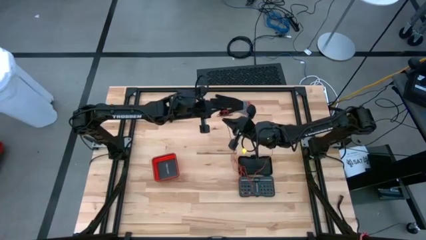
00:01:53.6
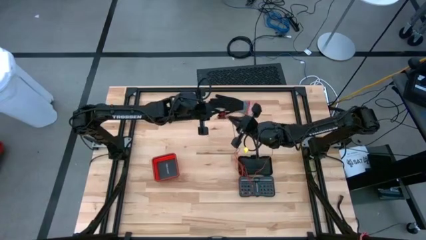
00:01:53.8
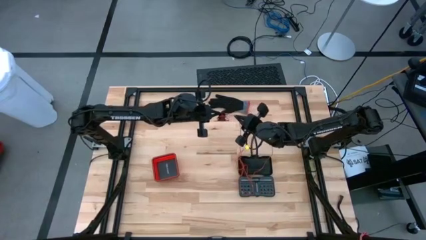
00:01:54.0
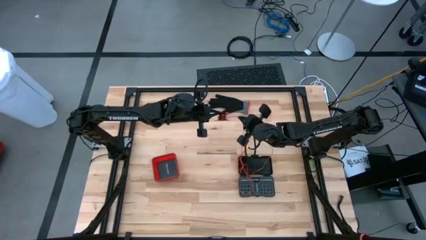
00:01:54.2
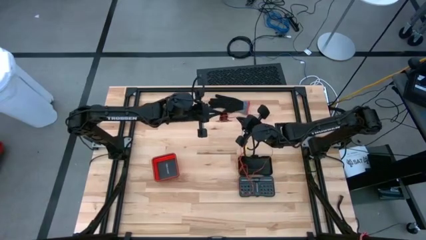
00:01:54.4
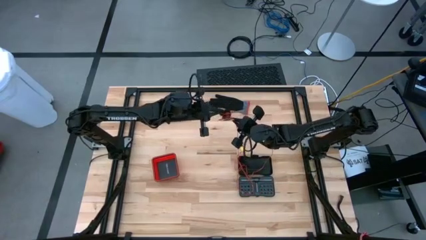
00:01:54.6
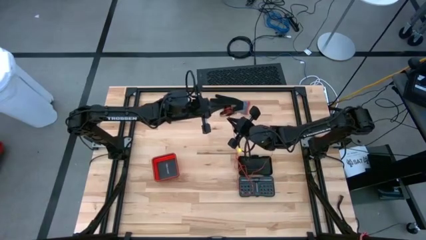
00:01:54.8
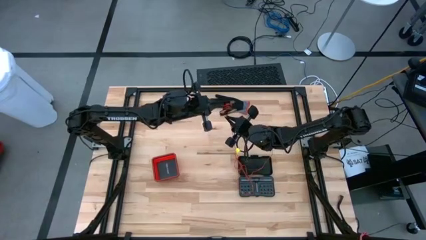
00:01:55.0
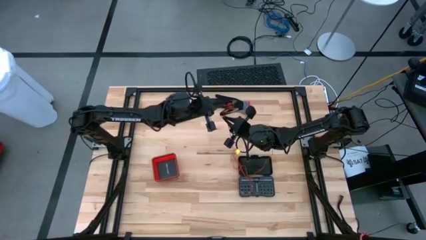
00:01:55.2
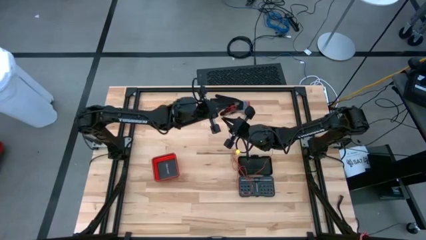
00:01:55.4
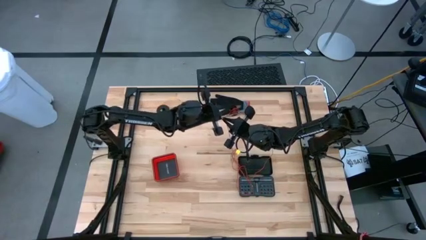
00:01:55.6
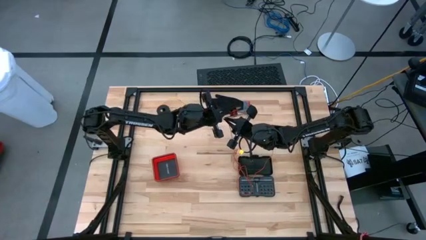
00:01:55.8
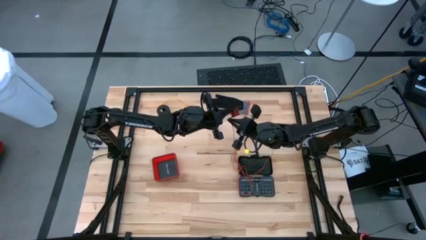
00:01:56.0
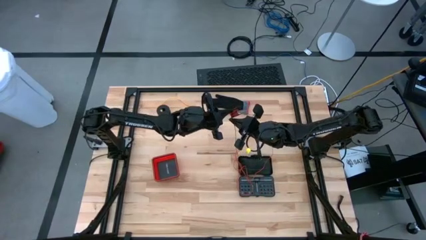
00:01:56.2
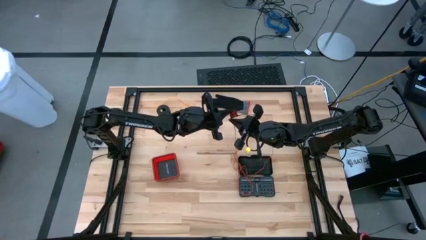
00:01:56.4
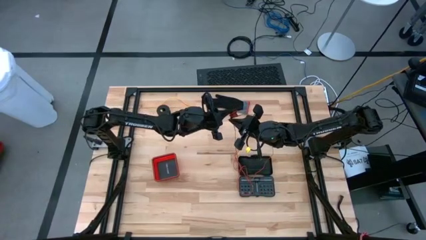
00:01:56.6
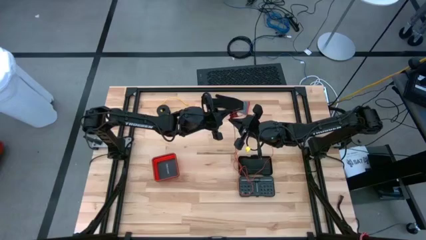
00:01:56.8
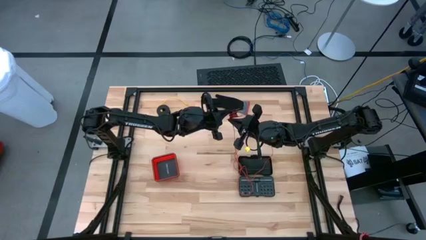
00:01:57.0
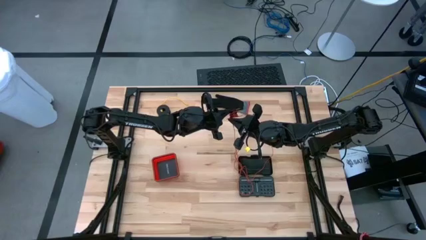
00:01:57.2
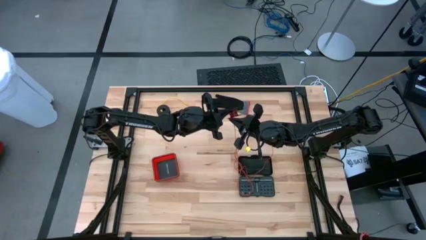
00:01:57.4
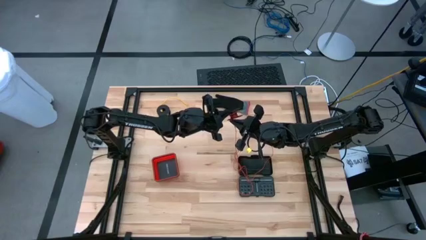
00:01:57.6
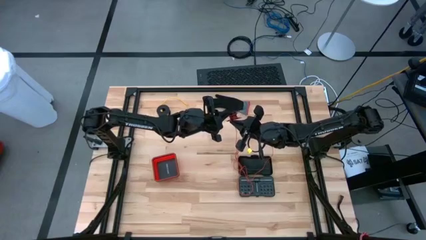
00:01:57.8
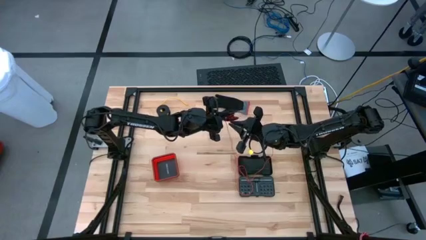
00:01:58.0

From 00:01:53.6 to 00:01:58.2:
Task: Coil cords
Coil the red wire onto the spool

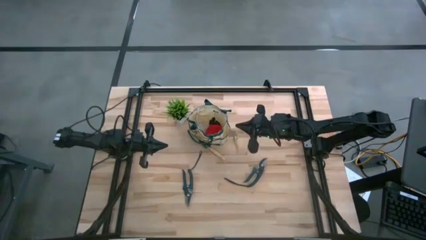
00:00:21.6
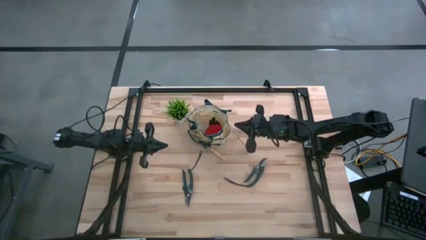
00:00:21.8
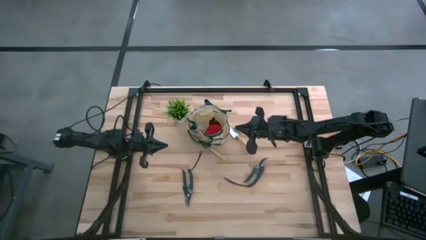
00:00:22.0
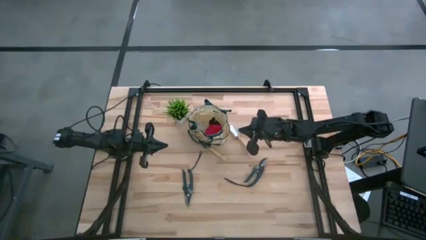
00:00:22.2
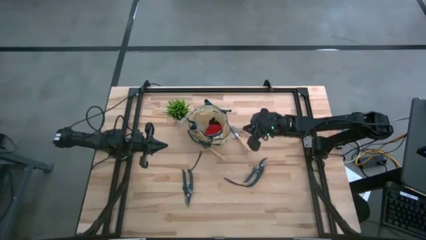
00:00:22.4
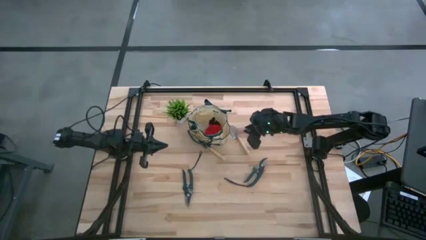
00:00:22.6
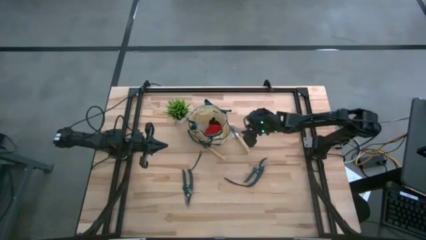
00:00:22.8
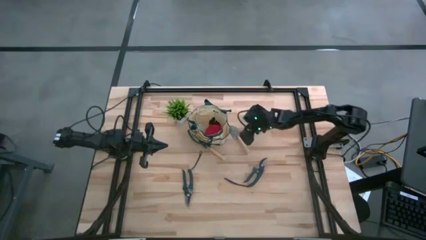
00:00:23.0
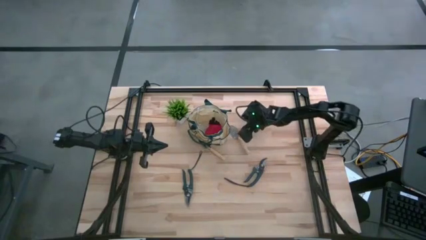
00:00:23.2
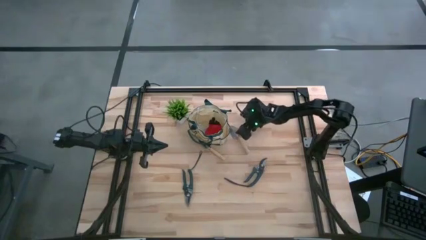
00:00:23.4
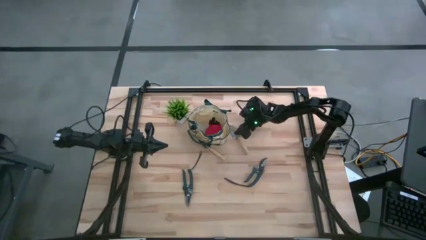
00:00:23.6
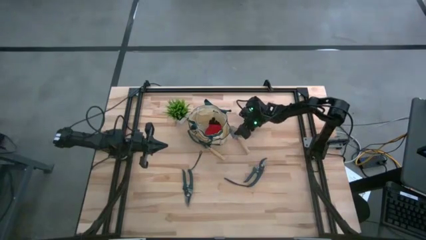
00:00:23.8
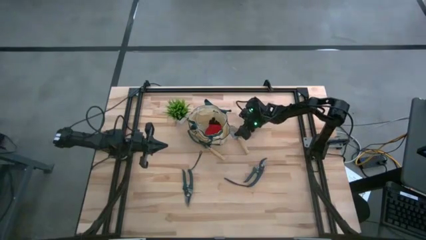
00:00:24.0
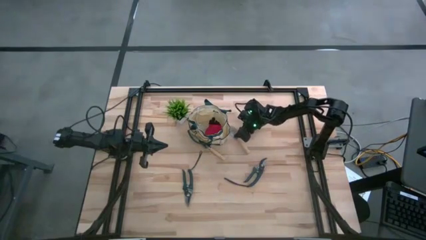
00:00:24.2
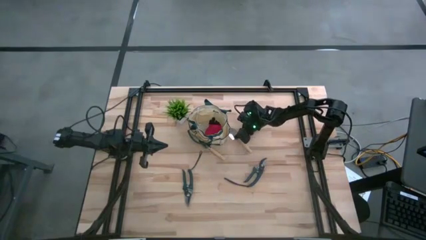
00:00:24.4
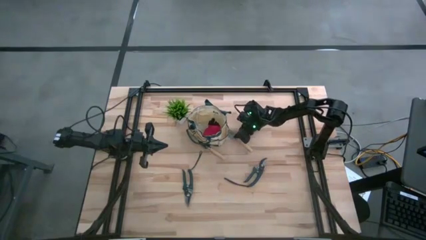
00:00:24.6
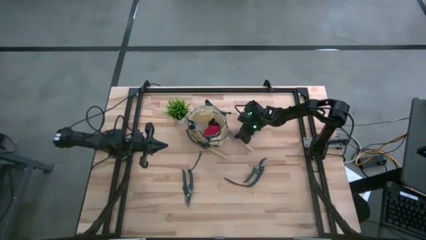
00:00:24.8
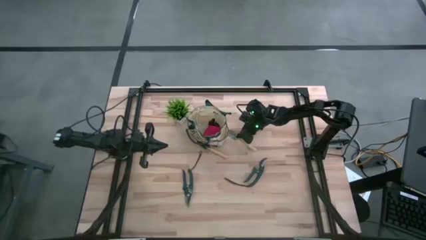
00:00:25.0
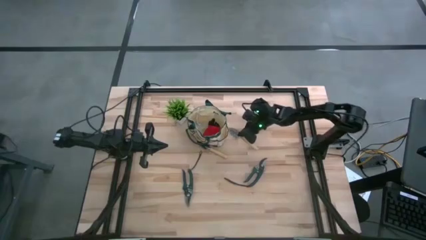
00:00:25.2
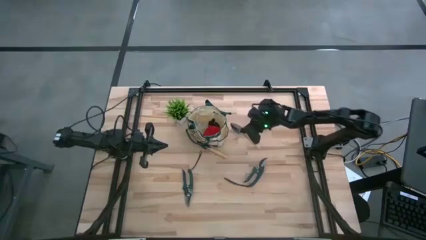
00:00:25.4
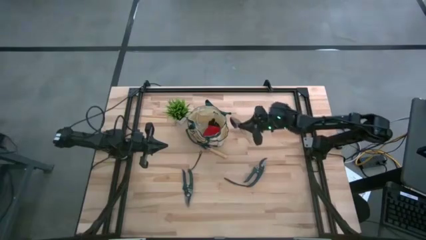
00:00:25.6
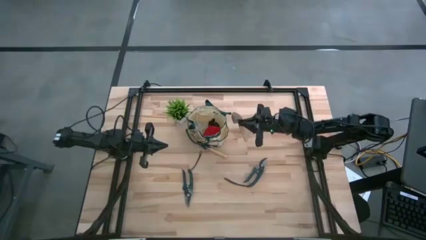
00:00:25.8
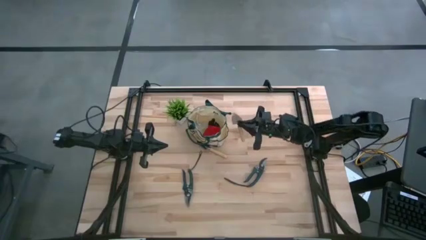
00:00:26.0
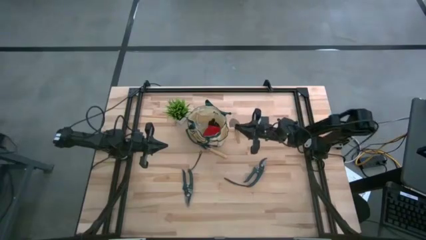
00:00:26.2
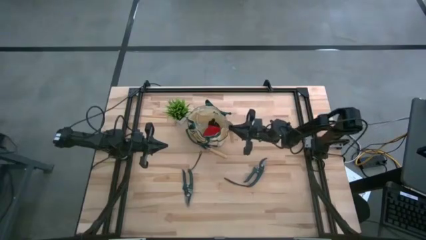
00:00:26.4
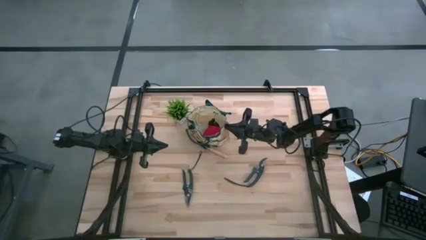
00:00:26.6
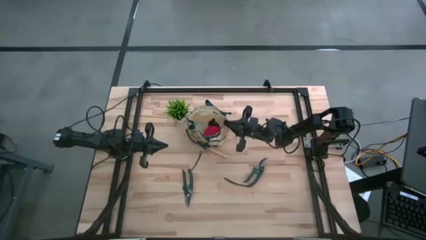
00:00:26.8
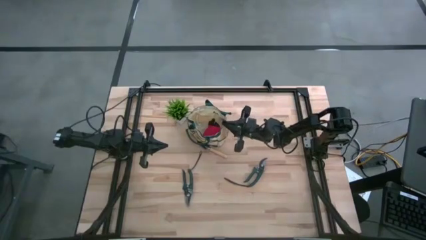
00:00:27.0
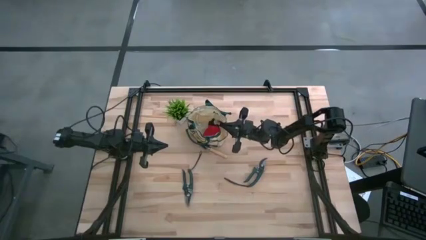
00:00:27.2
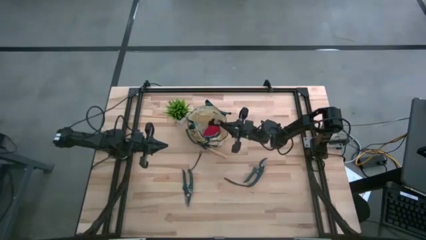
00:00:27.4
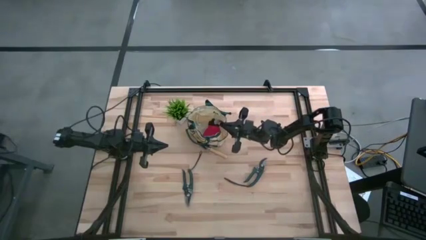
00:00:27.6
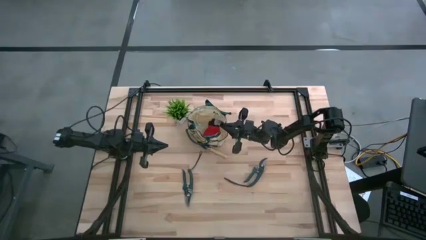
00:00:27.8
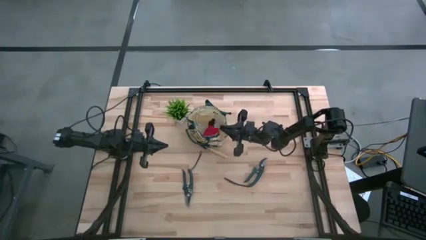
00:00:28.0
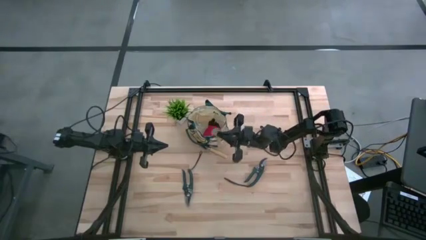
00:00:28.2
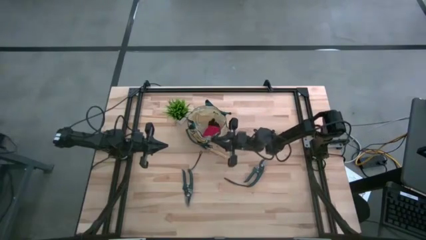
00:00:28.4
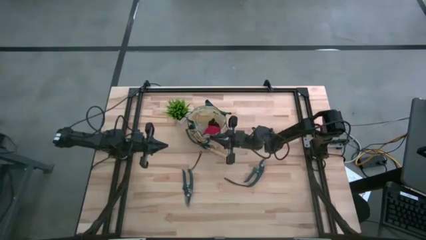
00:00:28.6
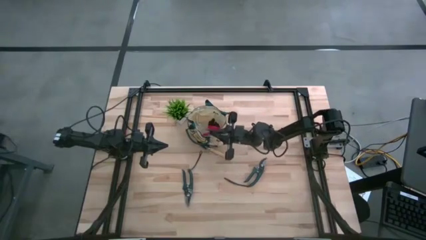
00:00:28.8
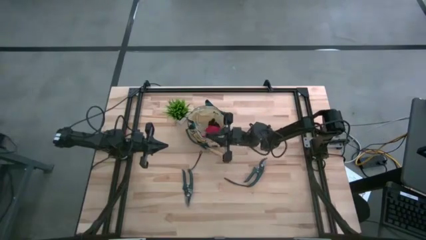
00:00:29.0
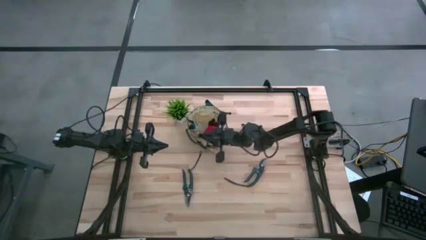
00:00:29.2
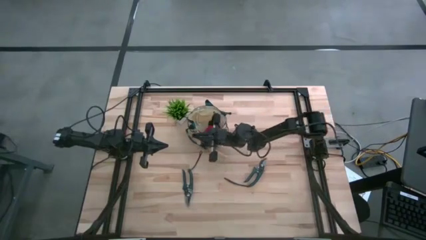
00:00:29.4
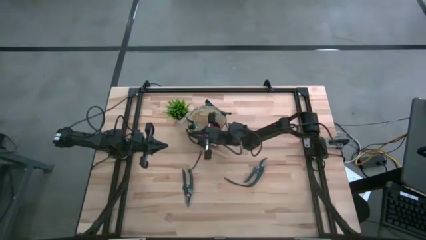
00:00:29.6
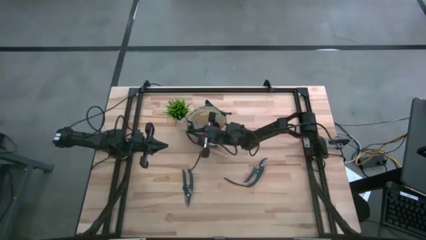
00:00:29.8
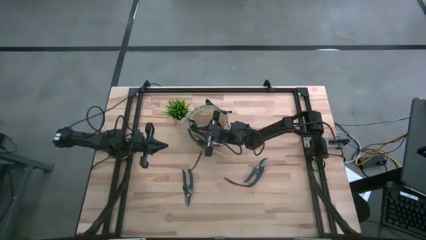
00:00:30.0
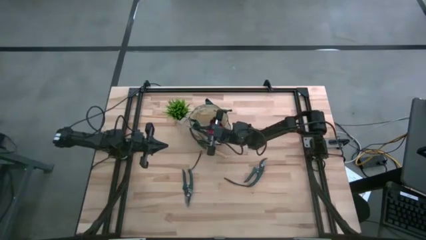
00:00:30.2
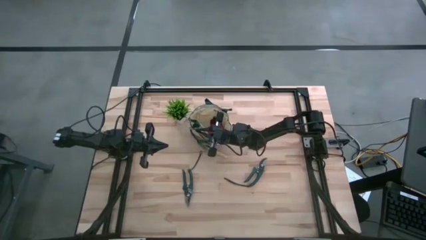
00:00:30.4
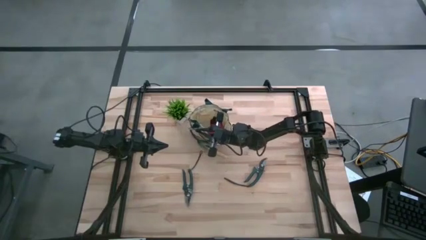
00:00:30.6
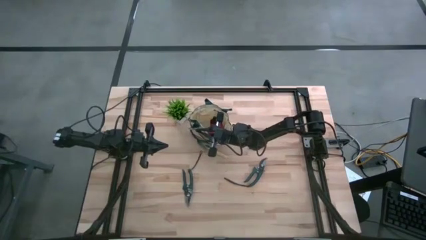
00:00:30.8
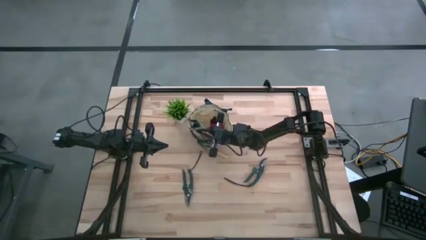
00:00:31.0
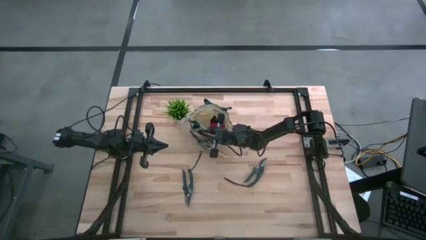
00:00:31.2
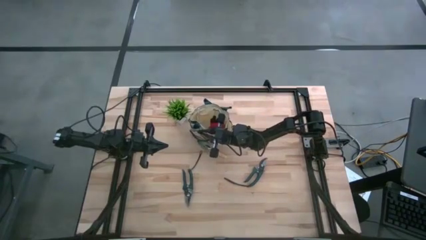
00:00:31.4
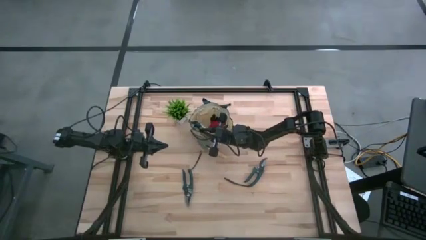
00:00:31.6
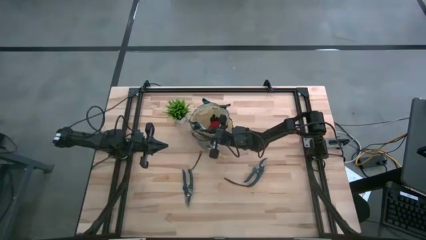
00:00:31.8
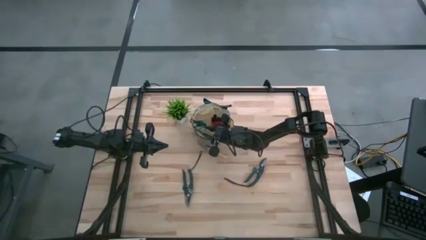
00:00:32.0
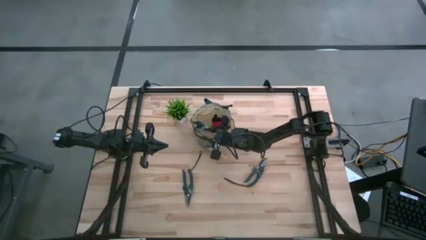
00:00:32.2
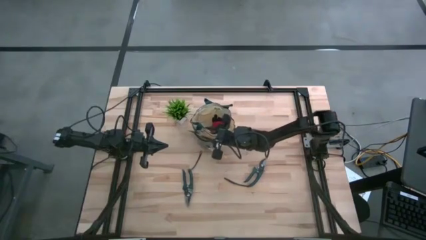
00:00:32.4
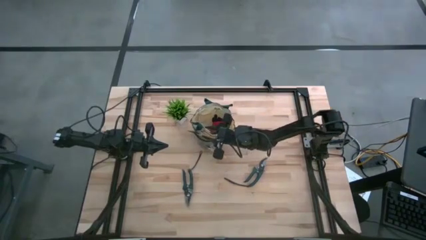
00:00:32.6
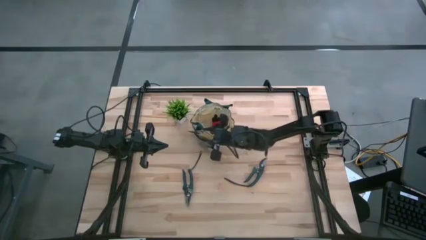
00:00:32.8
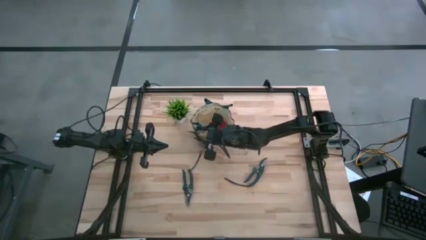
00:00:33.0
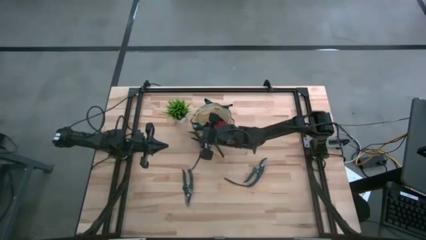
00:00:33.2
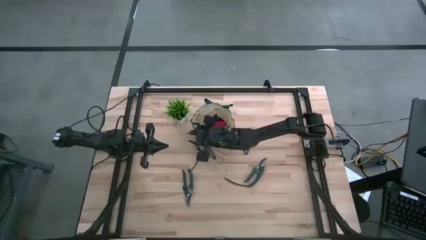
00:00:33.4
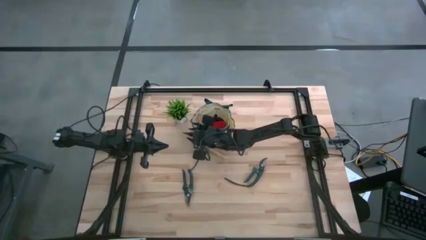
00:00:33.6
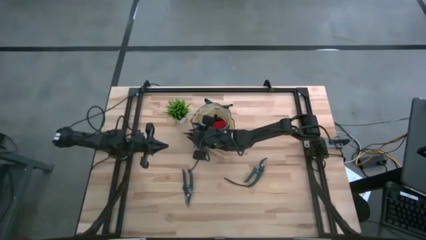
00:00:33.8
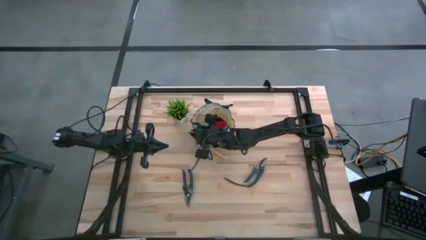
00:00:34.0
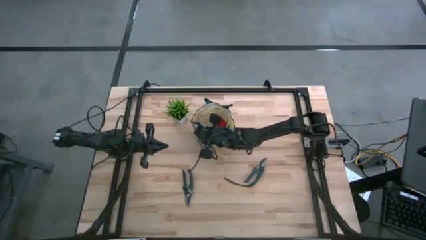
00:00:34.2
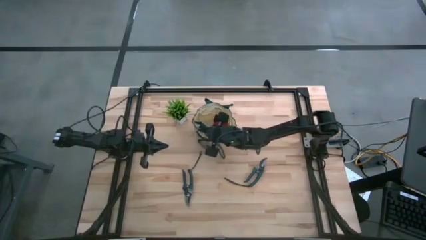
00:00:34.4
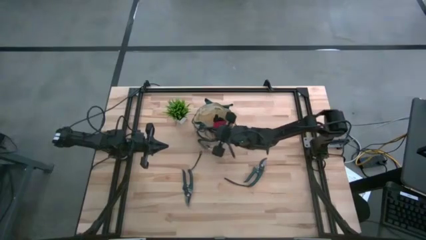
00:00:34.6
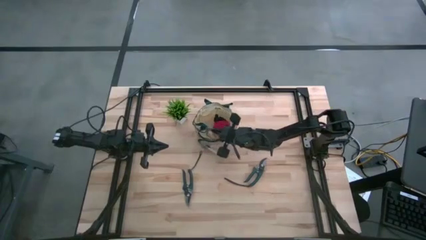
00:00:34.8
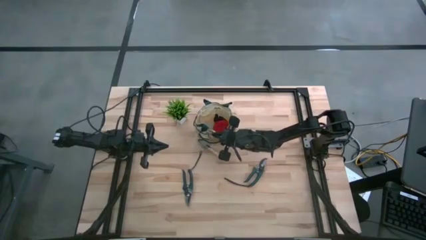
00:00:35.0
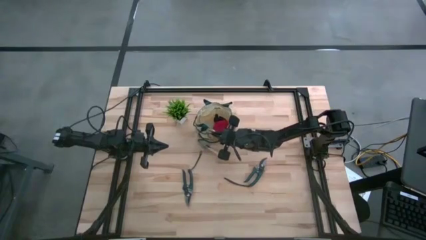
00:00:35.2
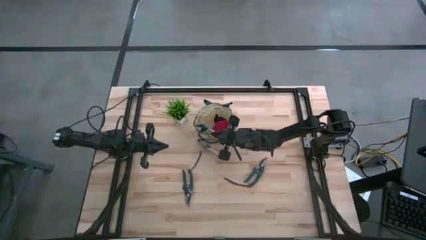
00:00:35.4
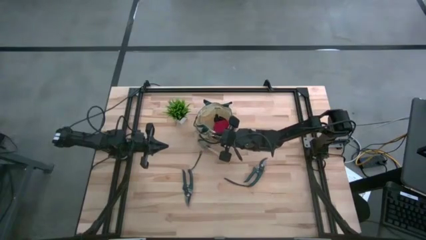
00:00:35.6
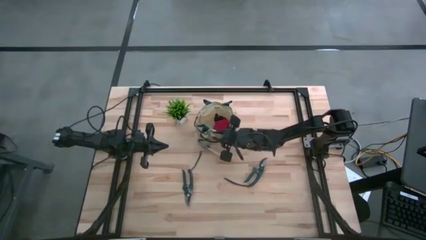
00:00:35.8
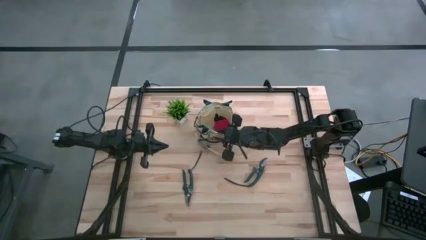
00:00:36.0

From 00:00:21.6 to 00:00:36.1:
Task: Pick & Place Garden tools in Gardening bag
Put the right brown trowel into the white gardening bag
